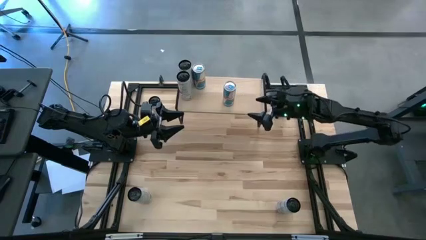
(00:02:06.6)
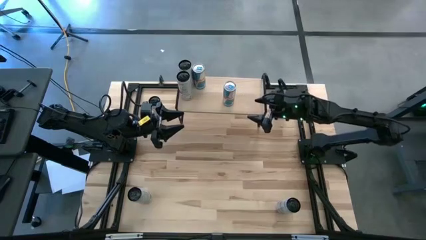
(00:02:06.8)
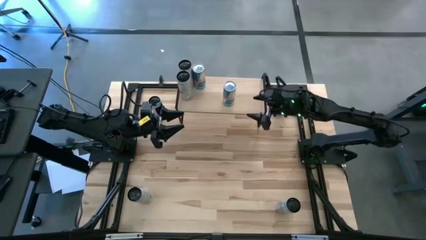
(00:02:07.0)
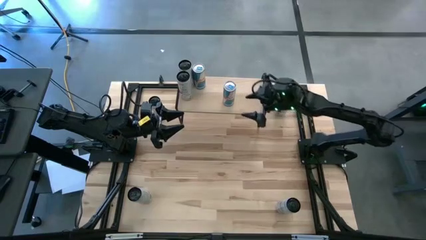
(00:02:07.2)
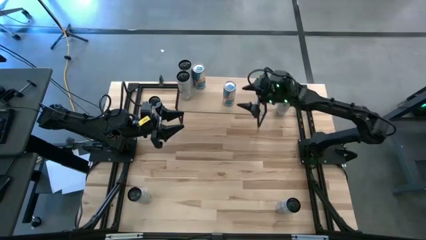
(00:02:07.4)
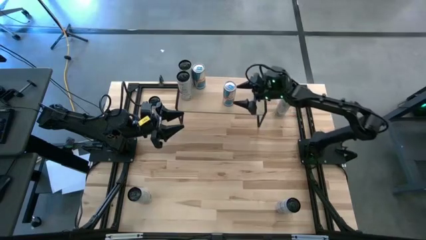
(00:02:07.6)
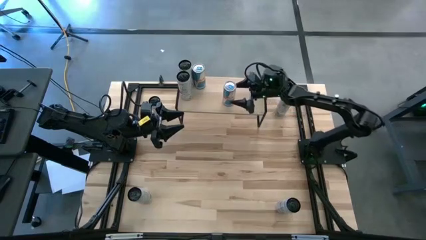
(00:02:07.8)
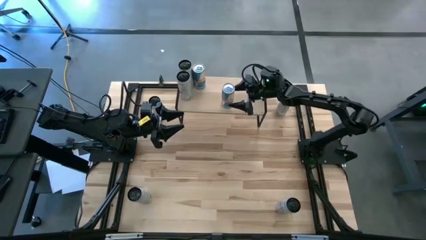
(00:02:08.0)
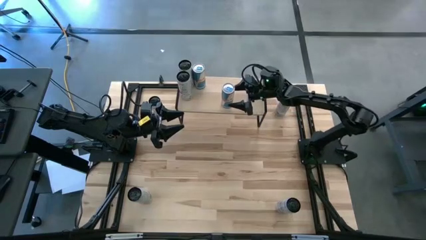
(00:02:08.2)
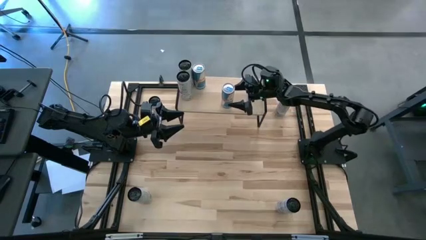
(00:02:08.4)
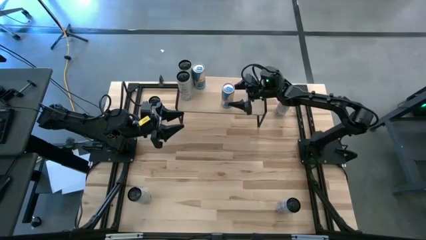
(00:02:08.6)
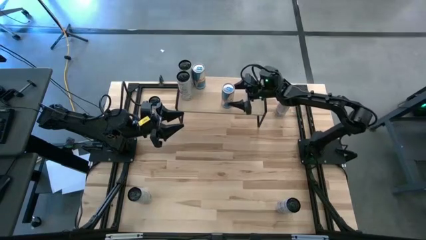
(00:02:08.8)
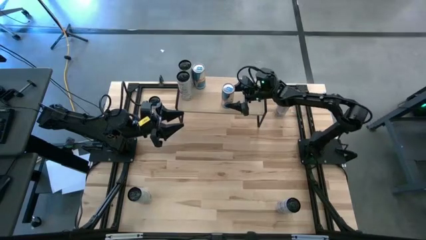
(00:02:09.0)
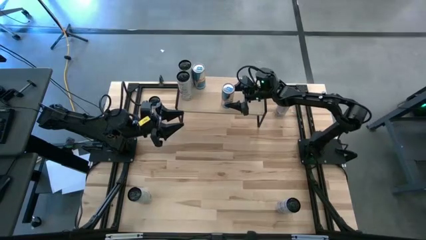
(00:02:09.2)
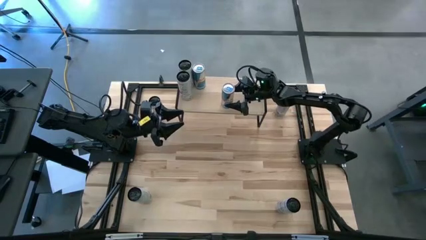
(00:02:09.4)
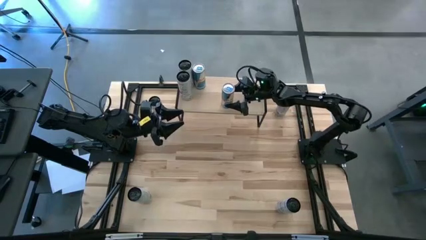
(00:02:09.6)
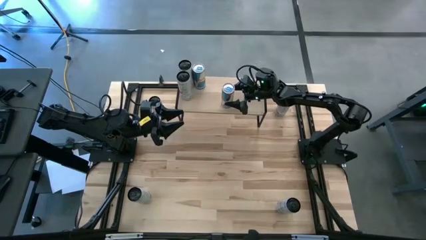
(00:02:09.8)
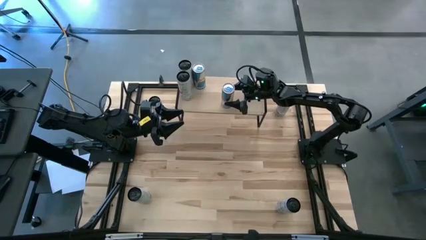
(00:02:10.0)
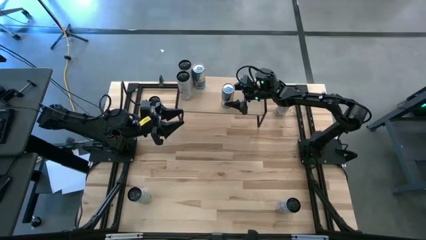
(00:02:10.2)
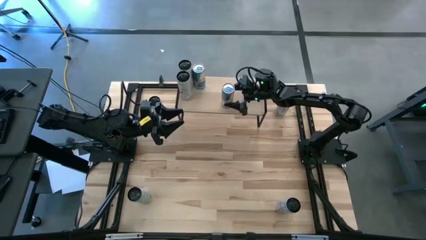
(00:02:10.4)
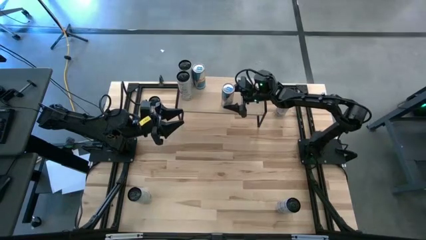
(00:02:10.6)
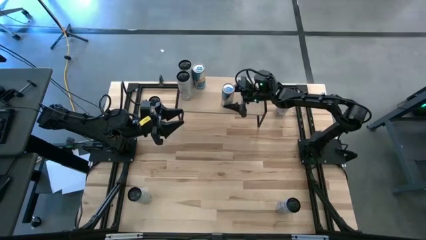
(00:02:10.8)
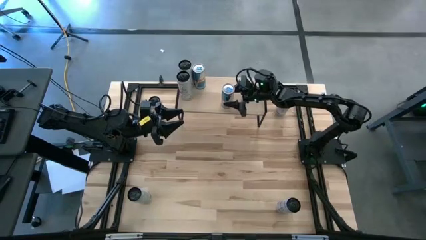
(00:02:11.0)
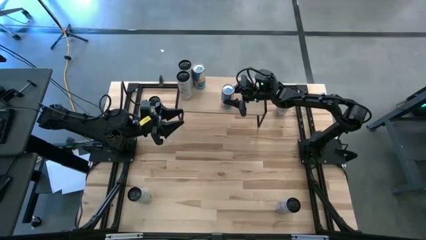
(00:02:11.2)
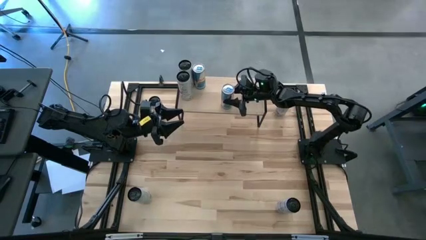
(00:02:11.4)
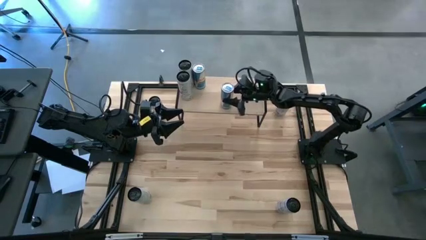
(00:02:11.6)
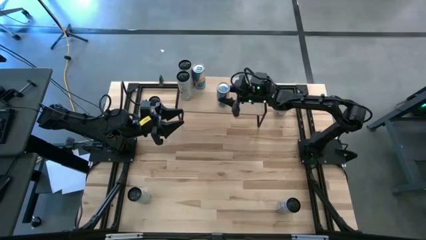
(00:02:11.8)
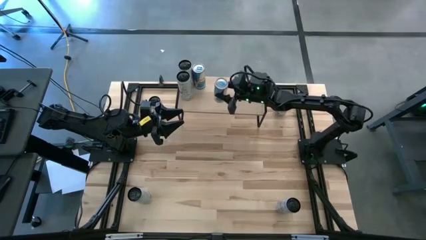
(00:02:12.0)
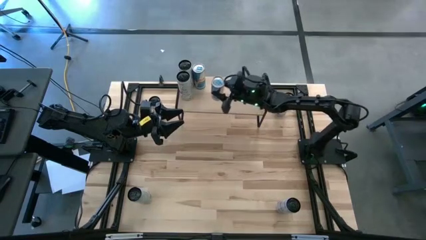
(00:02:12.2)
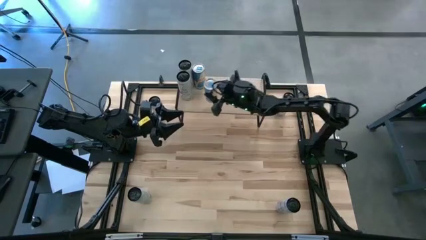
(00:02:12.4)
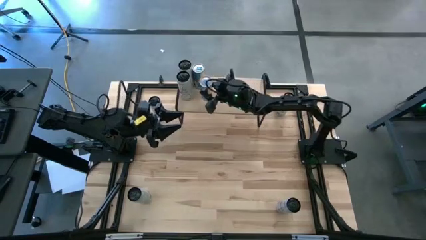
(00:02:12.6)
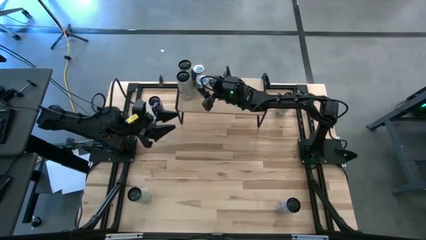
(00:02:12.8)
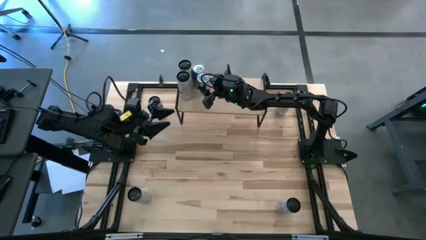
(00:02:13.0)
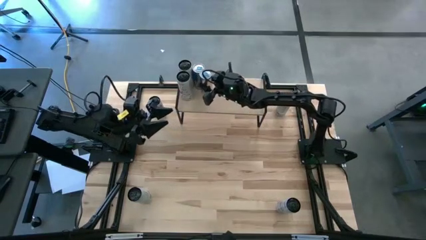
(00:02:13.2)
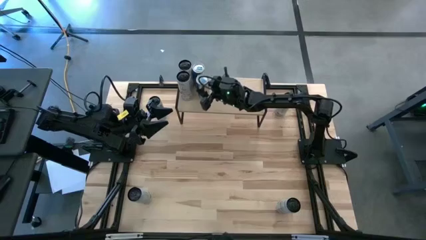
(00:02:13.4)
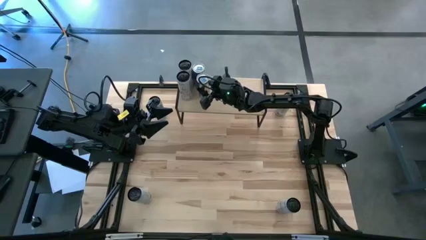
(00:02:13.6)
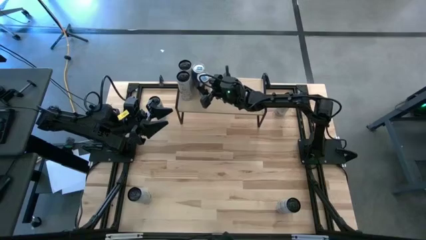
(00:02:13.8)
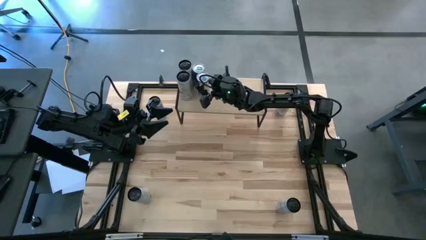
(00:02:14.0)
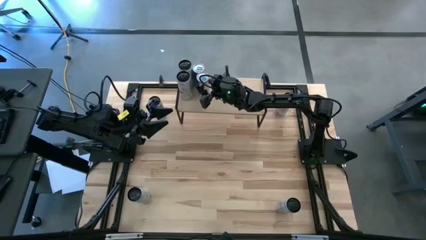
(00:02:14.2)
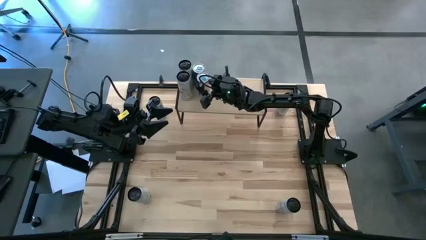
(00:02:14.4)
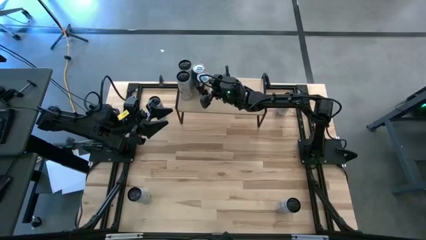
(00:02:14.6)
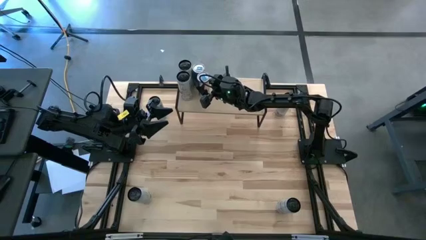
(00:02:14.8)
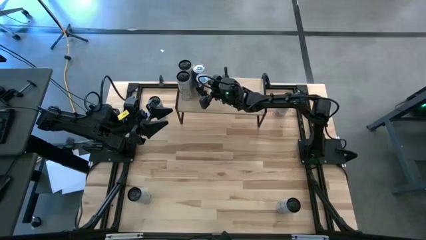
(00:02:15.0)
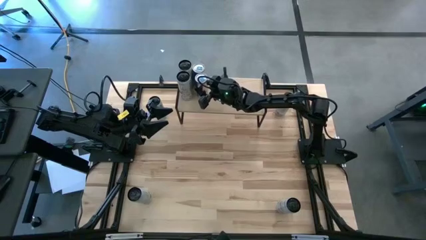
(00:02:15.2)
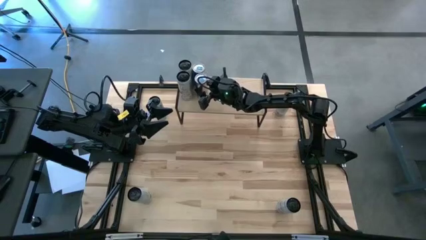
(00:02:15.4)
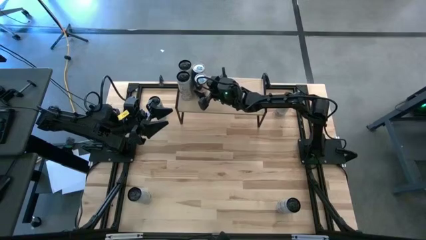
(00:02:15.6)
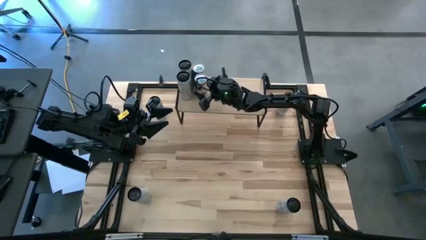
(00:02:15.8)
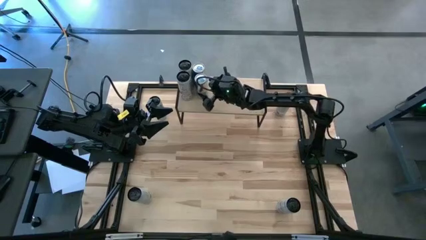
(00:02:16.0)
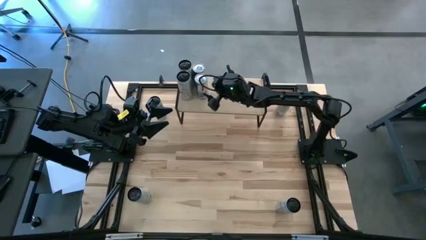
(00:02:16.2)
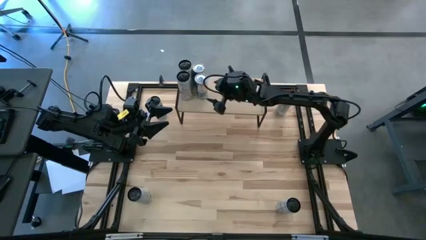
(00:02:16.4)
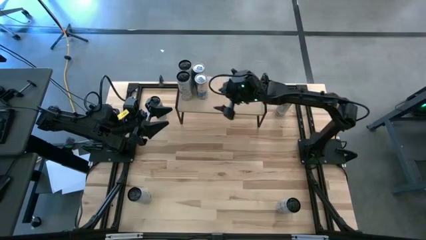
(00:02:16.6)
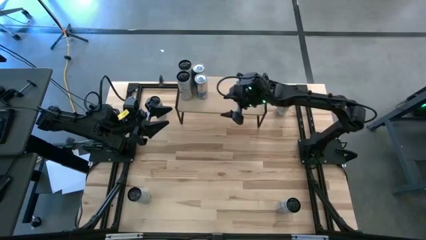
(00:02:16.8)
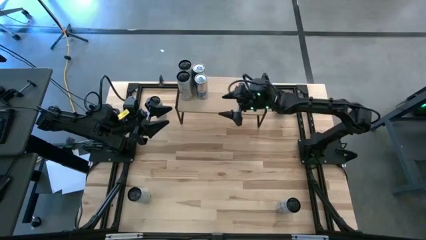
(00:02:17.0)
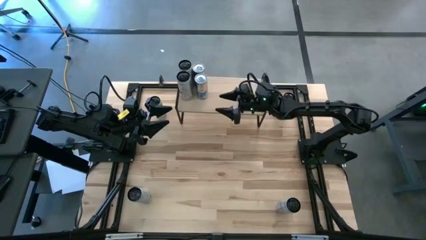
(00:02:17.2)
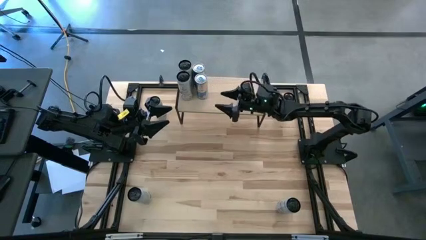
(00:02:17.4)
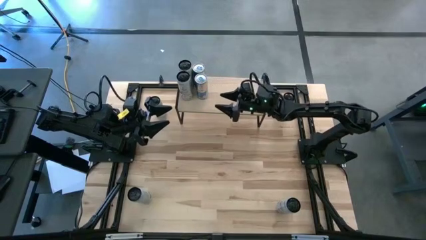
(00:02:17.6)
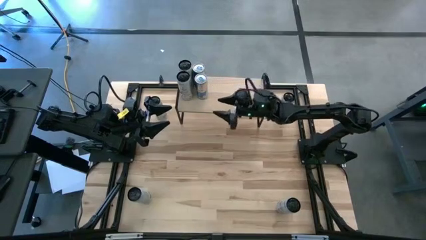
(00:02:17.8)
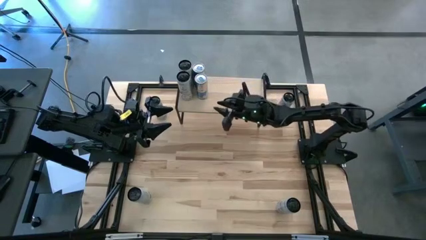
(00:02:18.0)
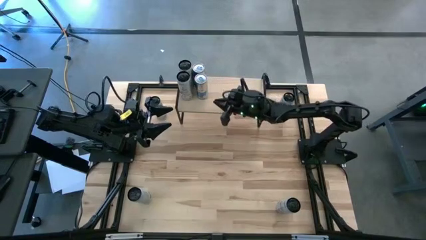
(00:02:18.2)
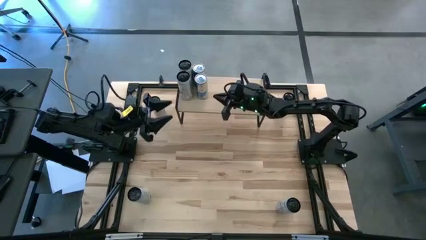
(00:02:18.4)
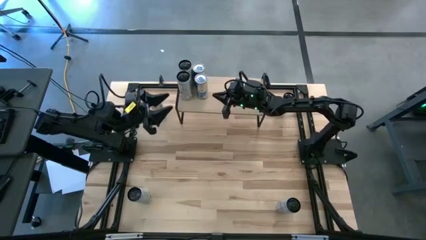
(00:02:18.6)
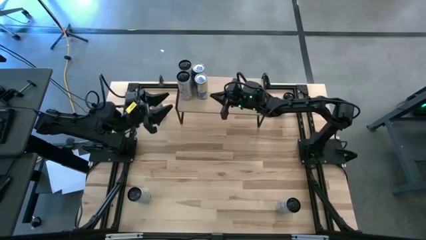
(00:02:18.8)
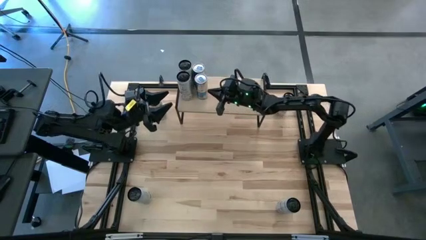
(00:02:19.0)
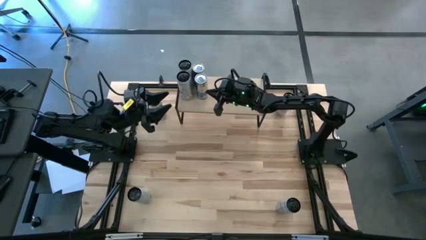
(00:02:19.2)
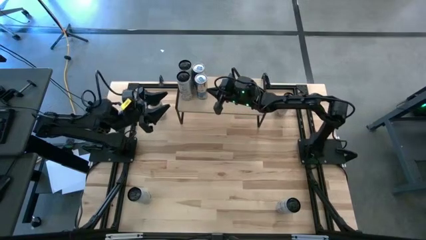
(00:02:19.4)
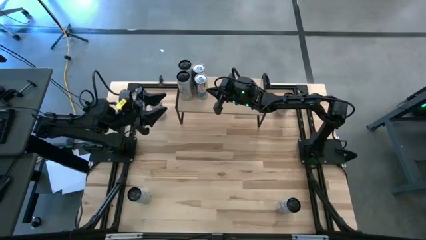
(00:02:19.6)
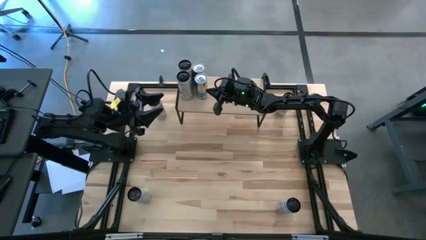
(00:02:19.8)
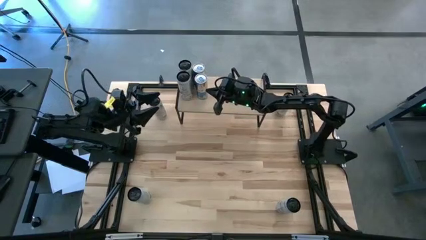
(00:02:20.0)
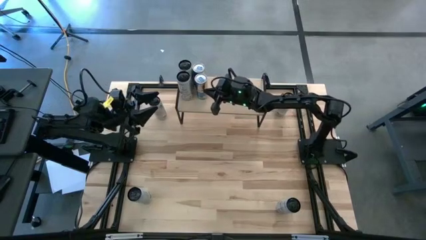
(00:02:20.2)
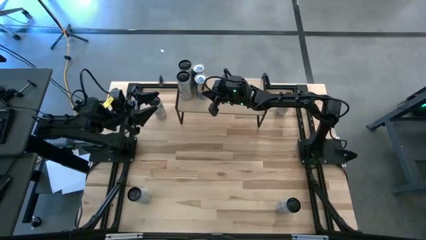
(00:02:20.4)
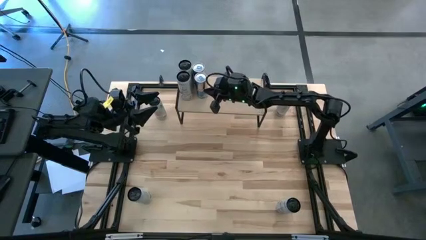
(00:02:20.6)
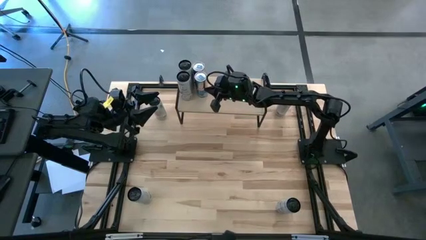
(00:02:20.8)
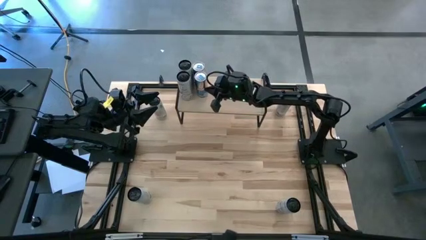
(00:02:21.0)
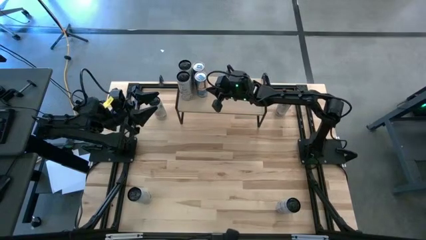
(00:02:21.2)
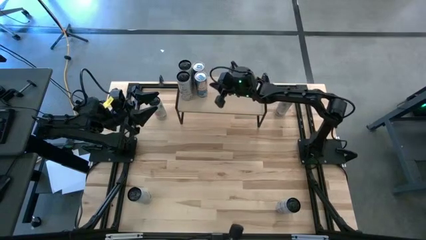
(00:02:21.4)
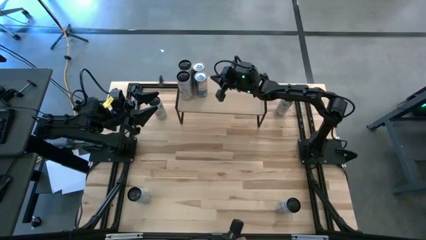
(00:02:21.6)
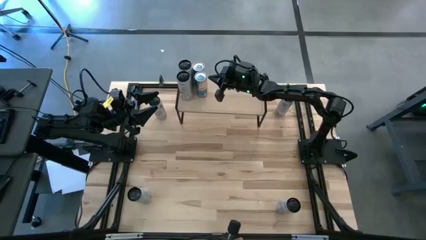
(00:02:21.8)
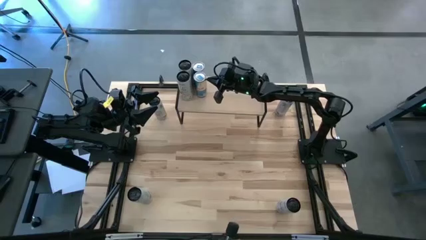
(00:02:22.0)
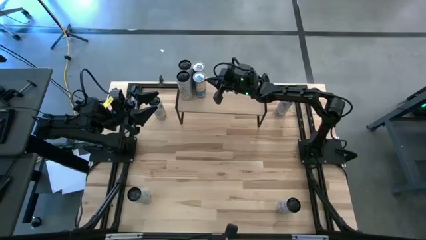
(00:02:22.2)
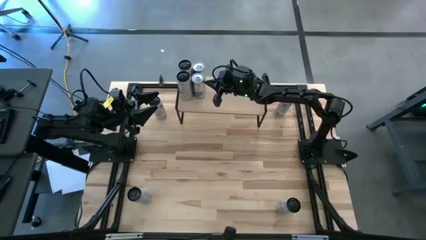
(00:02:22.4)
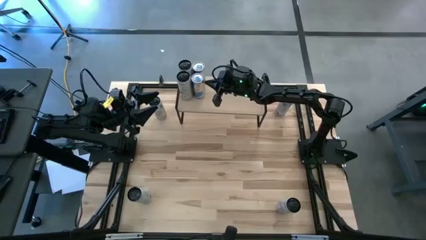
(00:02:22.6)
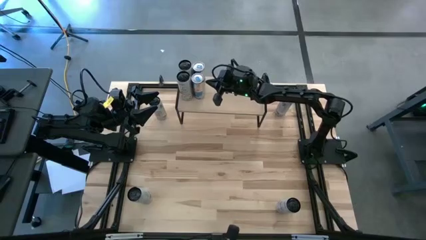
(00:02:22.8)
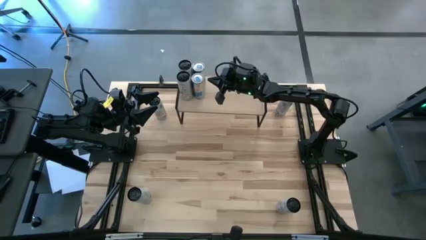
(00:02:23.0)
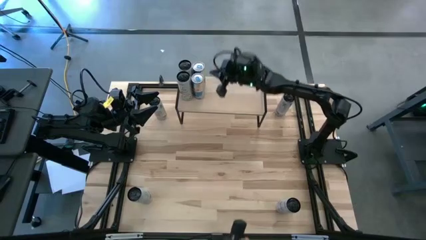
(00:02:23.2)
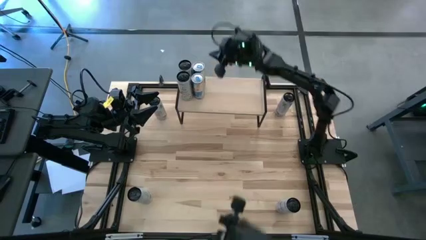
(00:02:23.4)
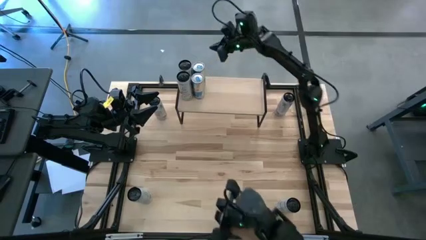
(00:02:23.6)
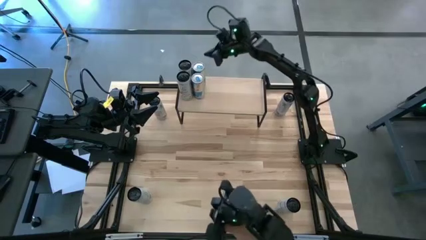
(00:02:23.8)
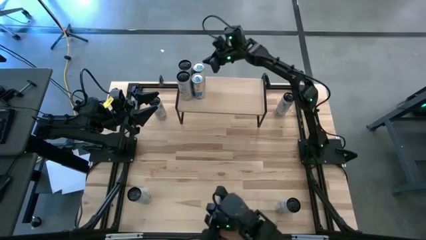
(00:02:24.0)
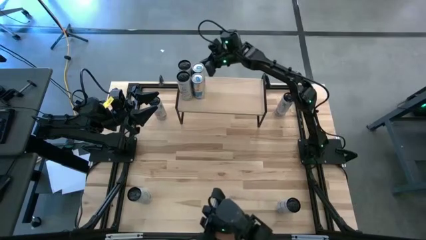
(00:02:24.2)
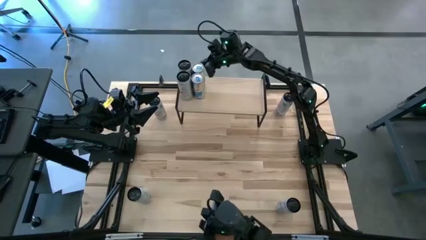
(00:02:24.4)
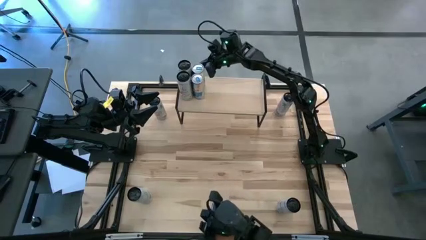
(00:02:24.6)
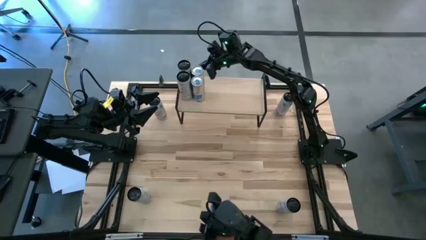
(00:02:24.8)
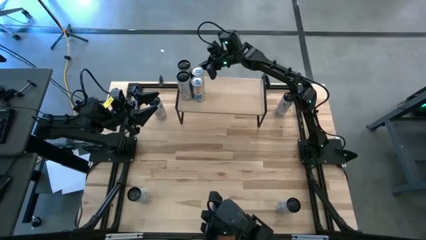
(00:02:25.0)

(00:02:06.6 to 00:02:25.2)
Task: Place canned beverage on shelf
Put the blue soda can on the shelf
